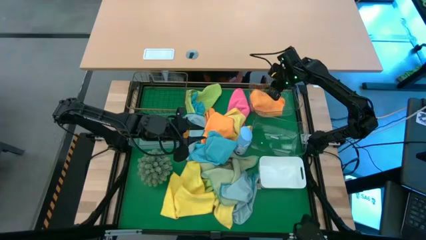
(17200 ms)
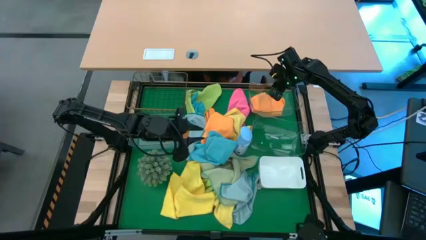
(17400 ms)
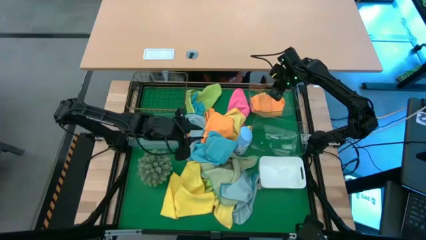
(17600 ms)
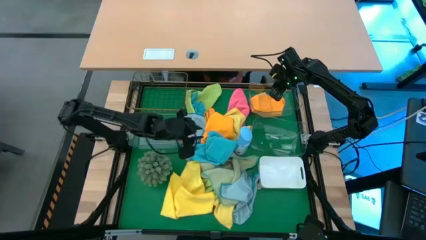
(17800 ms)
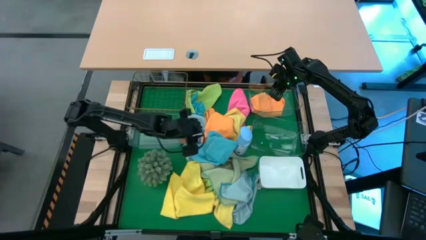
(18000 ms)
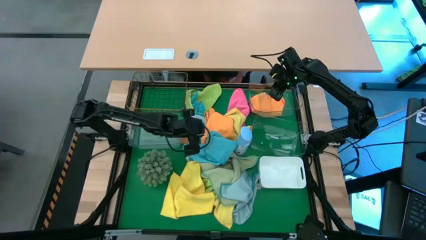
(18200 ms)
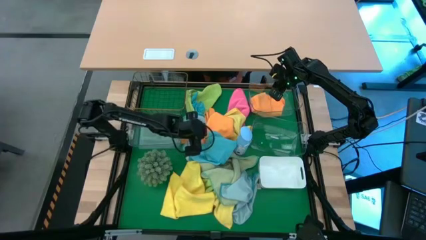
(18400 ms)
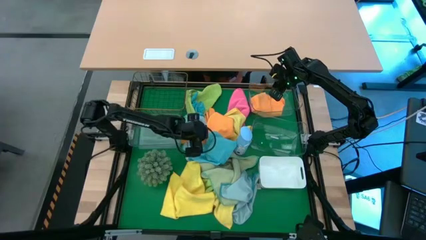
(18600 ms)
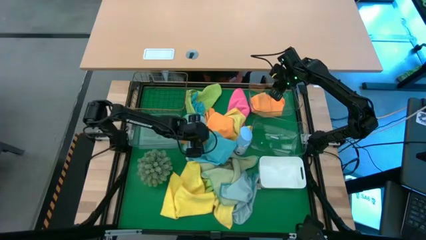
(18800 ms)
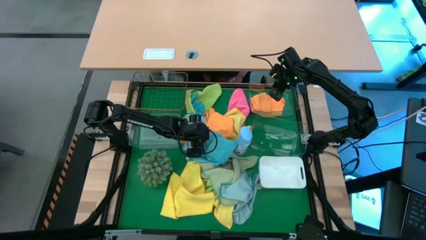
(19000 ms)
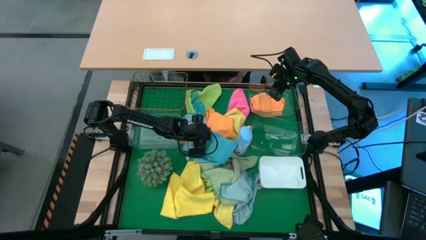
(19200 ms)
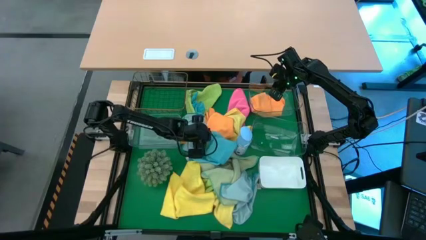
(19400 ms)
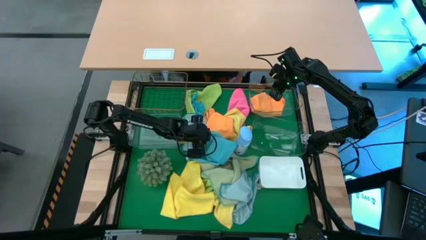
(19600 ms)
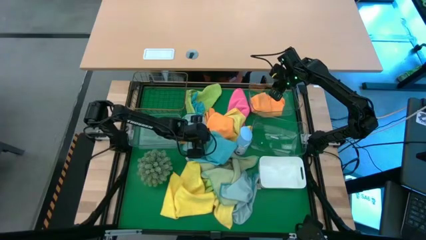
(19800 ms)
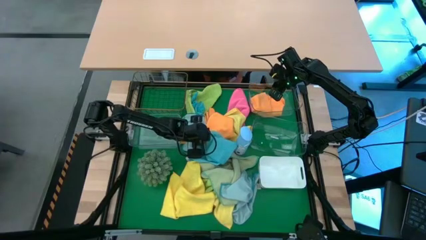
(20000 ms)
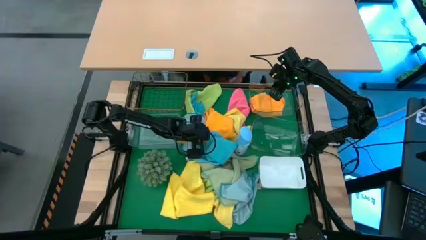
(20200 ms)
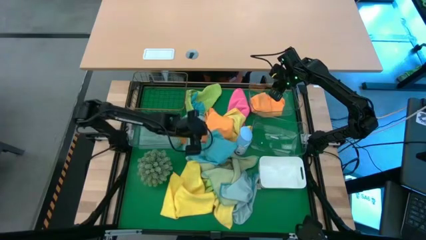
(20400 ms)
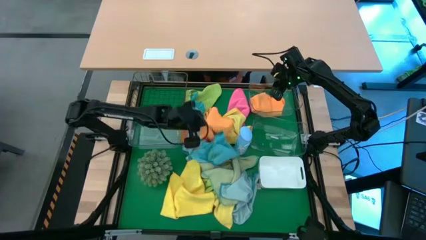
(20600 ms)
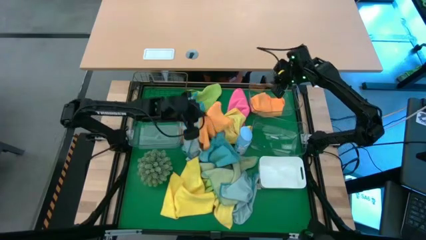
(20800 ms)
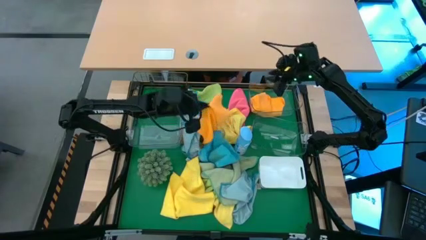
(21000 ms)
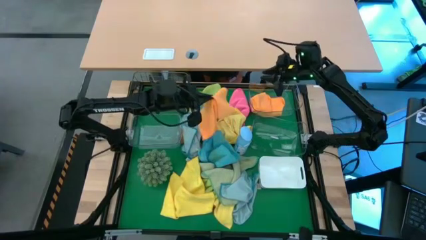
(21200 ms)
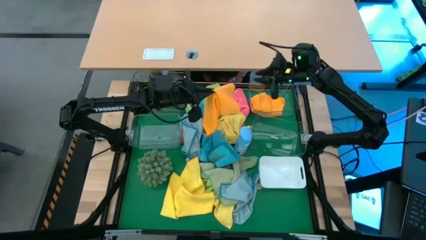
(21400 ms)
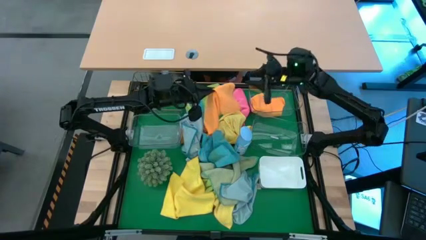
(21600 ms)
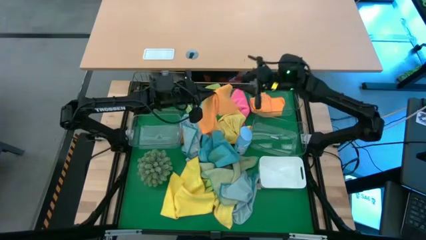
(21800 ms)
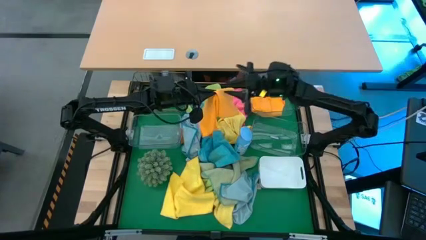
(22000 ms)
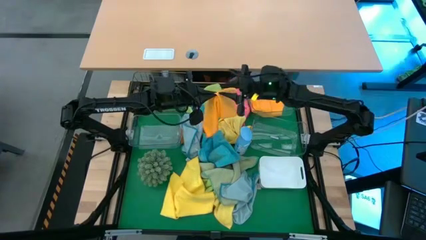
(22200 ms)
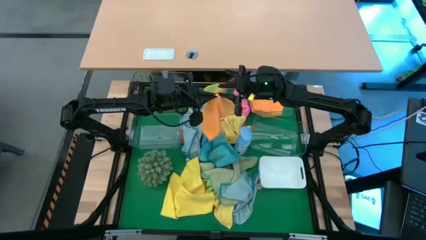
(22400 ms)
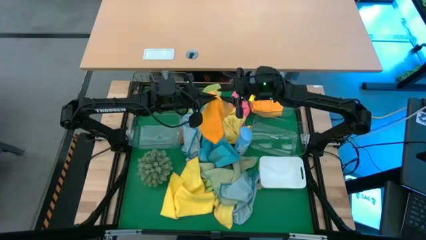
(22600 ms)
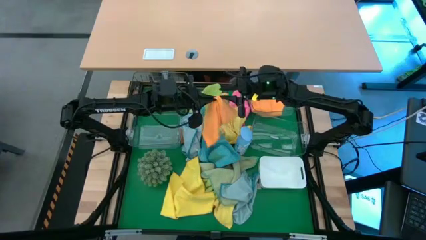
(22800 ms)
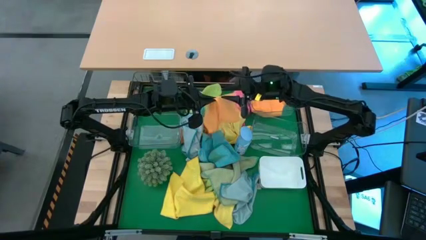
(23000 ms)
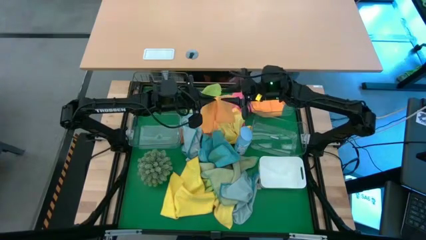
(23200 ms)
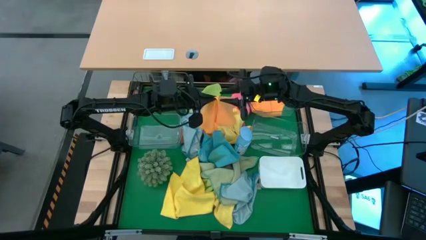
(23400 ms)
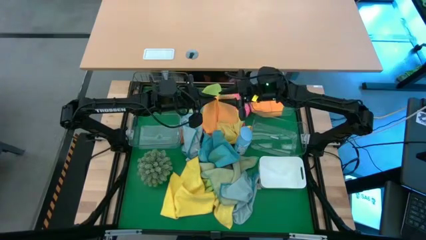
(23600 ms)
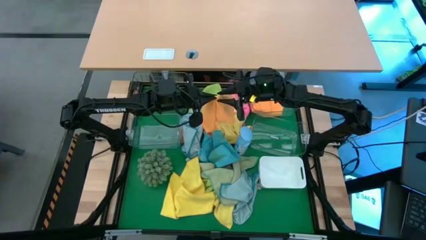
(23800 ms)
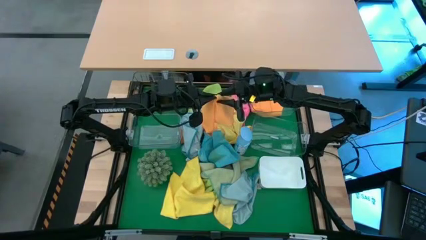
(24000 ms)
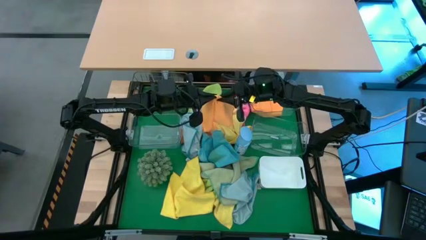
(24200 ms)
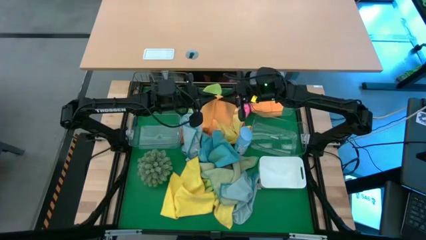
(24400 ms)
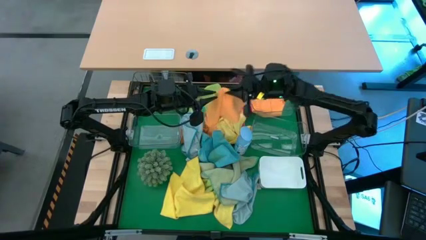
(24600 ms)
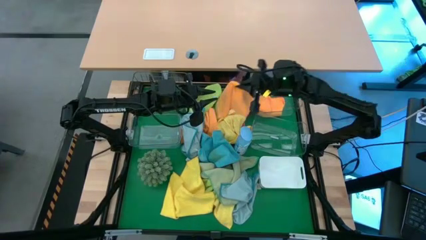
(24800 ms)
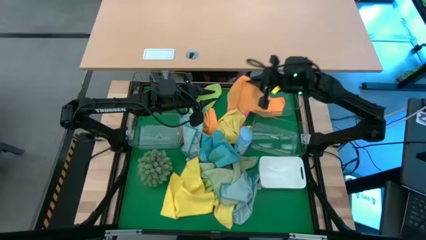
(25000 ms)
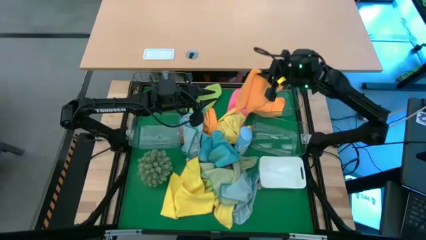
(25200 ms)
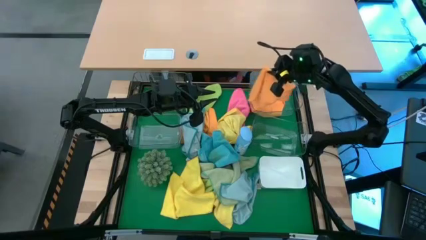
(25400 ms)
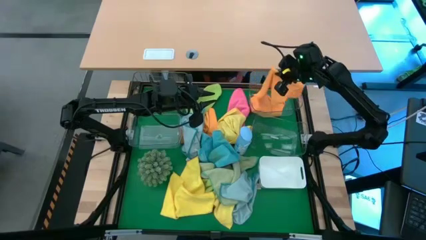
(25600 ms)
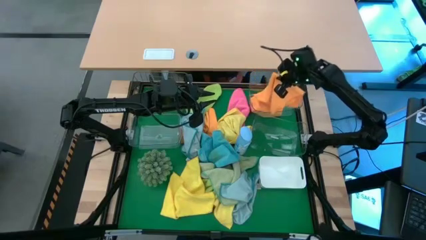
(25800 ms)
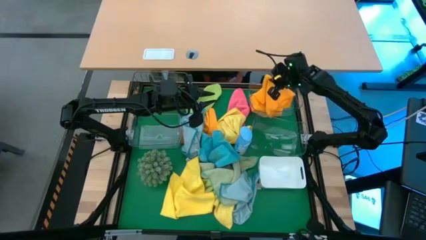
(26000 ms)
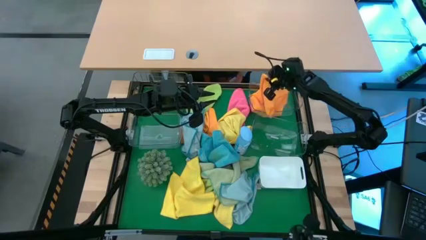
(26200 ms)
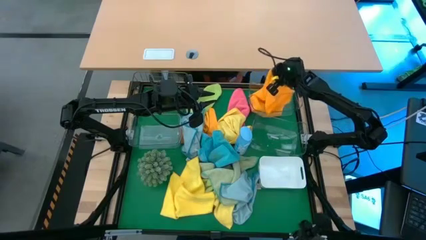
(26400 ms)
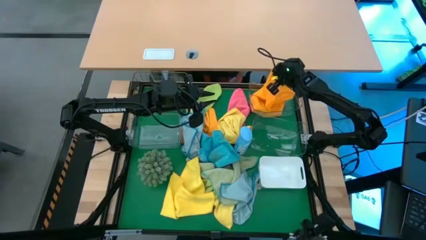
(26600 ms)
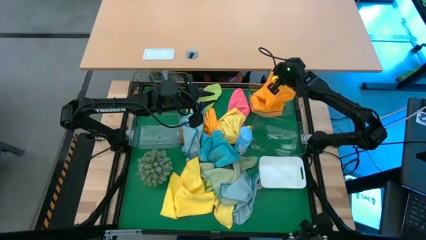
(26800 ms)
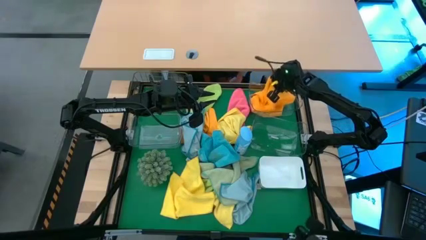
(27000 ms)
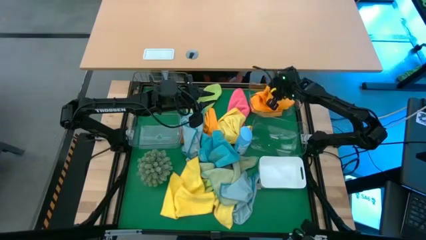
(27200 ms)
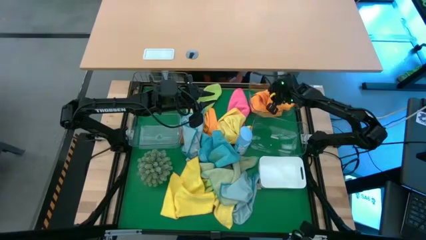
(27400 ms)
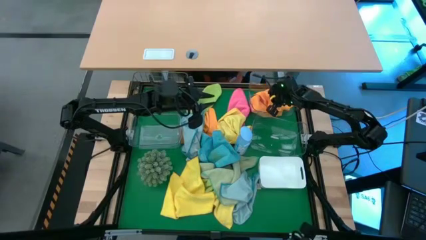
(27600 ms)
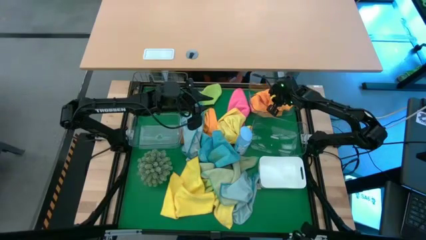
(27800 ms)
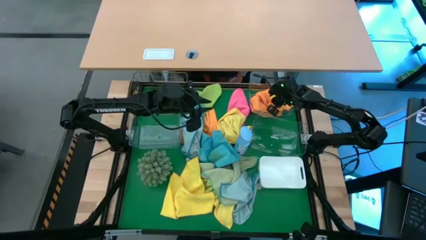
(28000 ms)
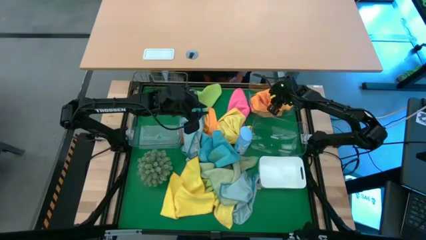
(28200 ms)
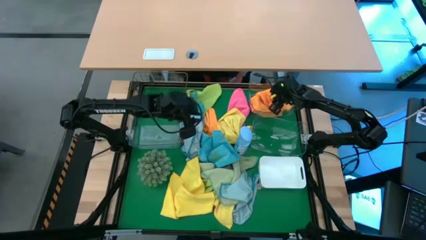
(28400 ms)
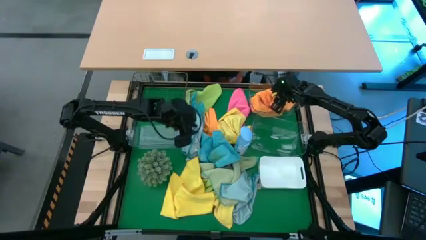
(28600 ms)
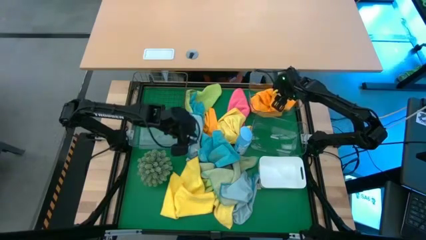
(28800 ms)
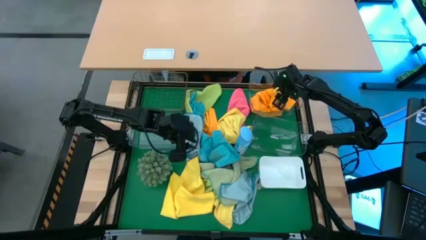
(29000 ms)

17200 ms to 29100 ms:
Task: Sort microfiber towel by color & place in baskets
Put the orange microfiber towel into the top right transparent bin

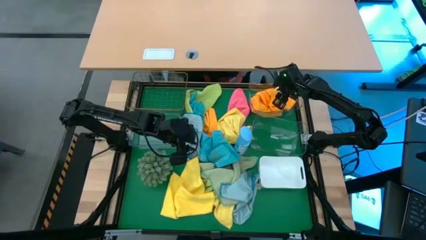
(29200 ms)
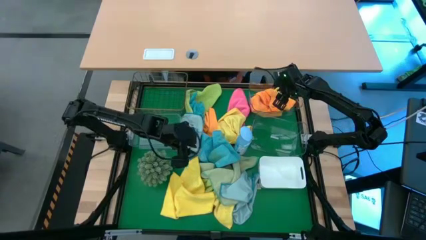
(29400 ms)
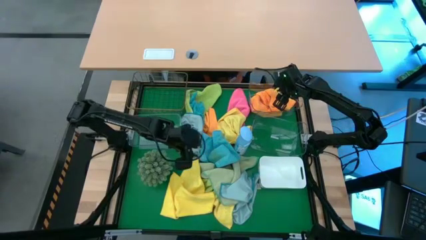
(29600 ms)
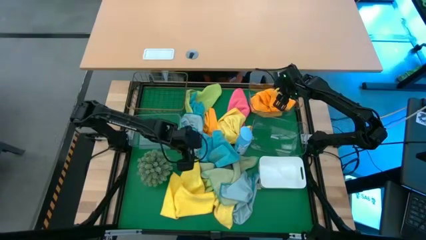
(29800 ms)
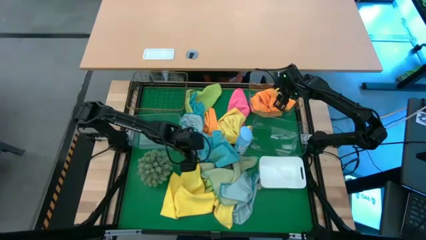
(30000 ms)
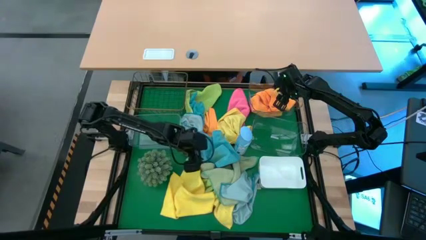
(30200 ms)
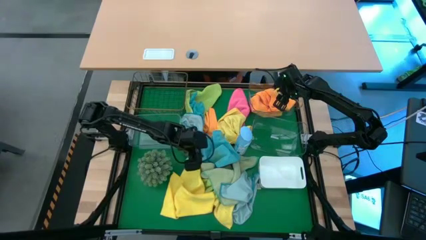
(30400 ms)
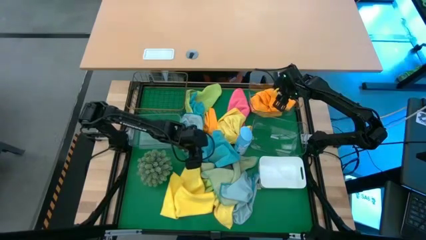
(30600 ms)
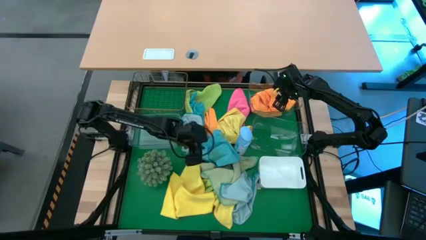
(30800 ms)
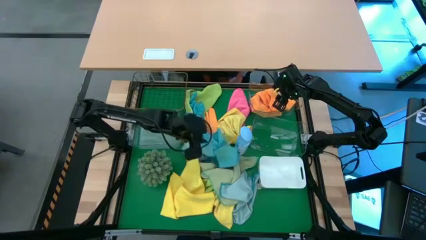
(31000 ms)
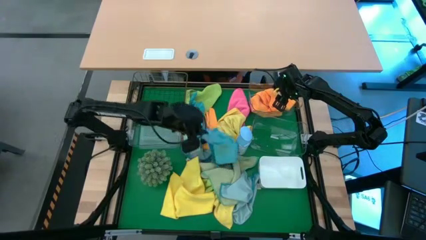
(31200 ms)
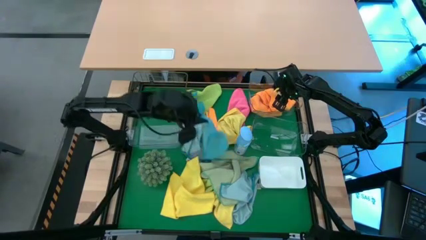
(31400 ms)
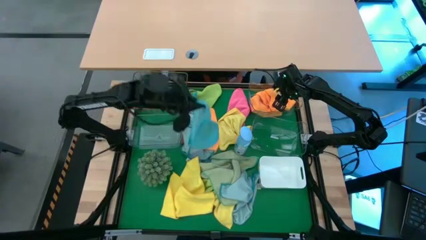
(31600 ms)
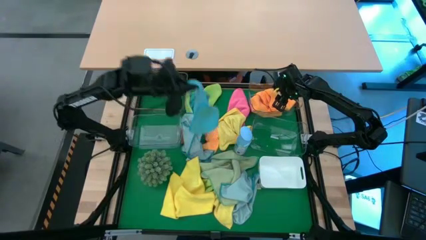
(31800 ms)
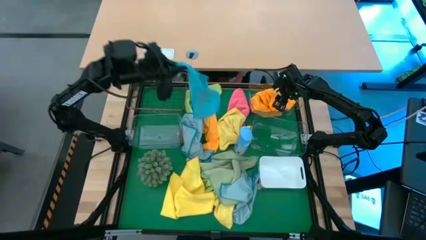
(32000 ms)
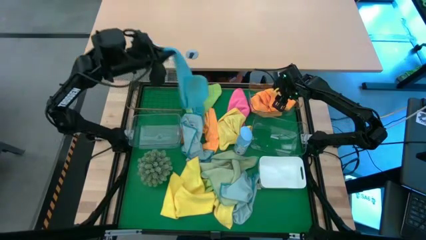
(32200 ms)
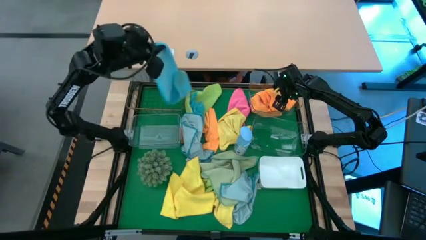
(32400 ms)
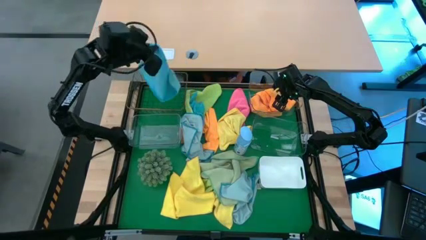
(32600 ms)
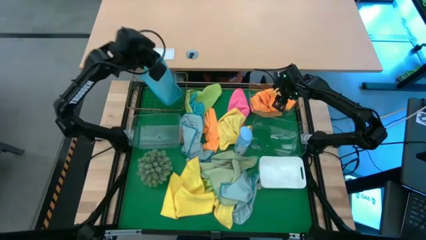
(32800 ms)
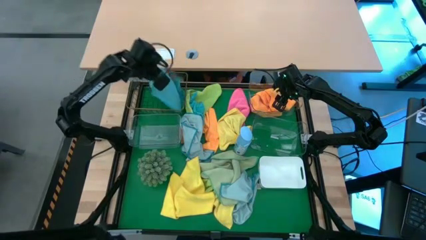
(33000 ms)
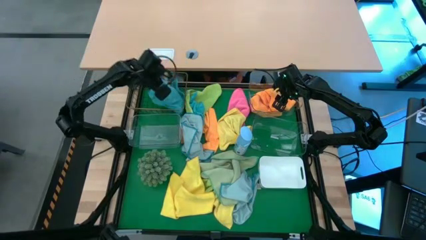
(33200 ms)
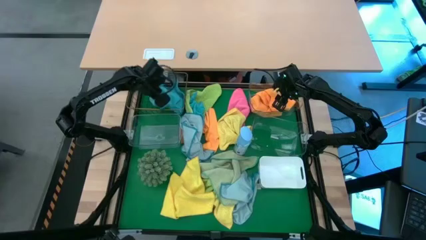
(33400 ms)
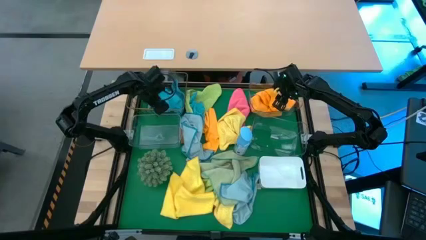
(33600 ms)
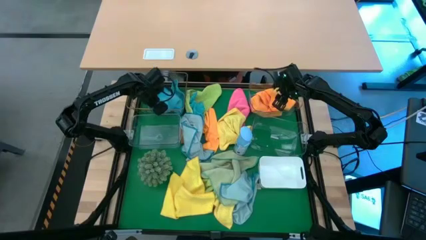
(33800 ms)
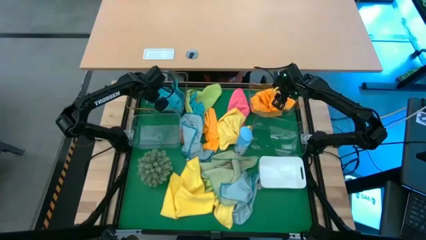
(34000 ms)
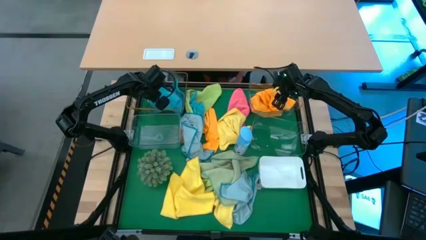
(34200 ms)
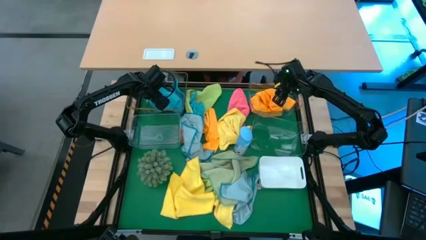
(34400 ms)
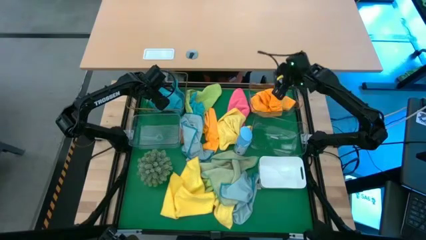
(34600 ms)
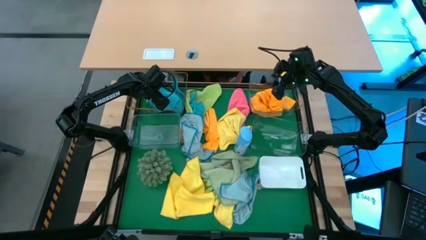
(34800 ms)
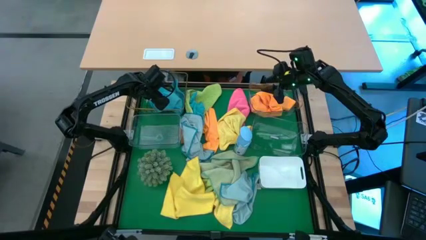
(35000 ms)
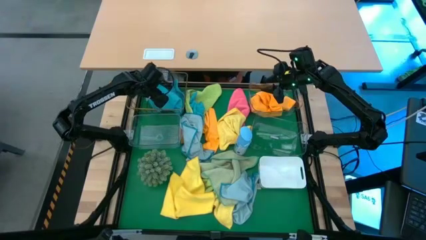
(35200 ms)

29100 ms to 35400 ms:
Put the blue microfiber towel into the gold wire basket
